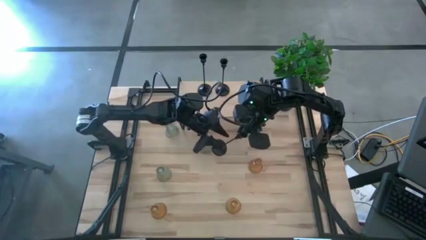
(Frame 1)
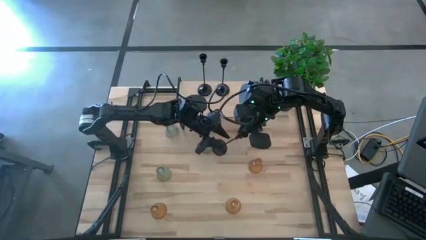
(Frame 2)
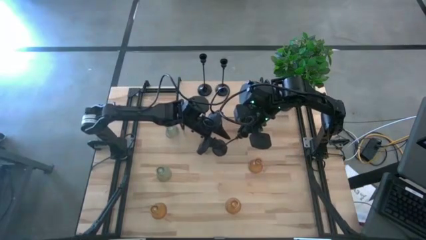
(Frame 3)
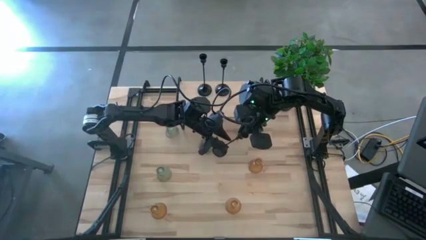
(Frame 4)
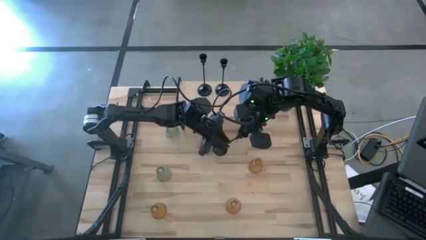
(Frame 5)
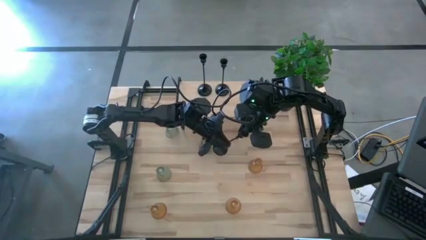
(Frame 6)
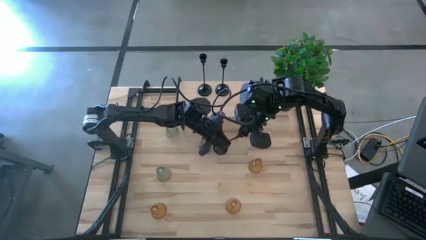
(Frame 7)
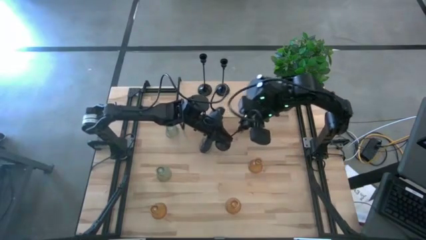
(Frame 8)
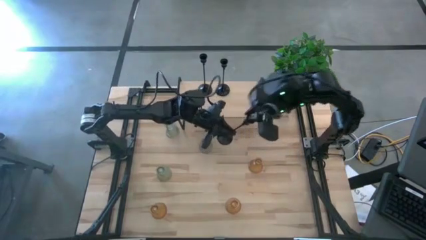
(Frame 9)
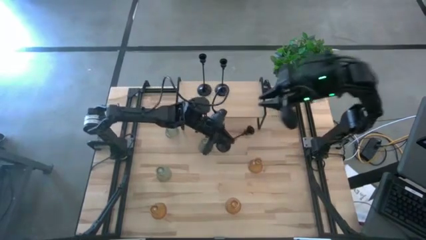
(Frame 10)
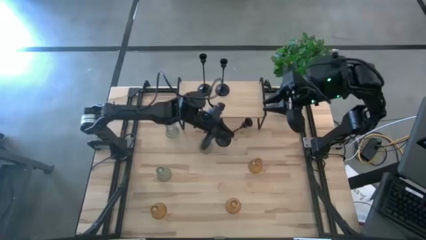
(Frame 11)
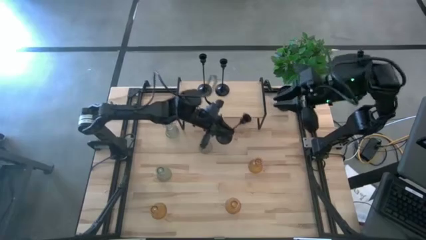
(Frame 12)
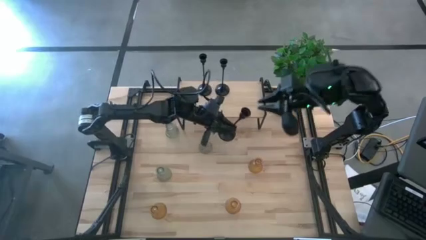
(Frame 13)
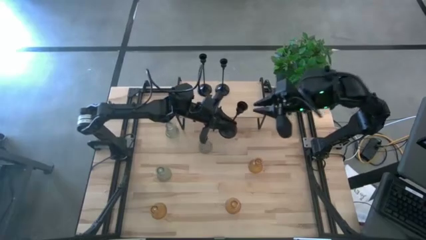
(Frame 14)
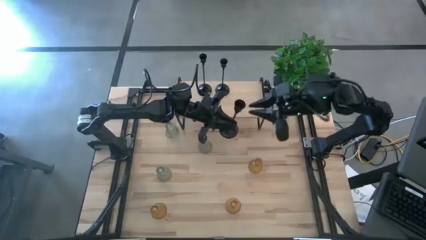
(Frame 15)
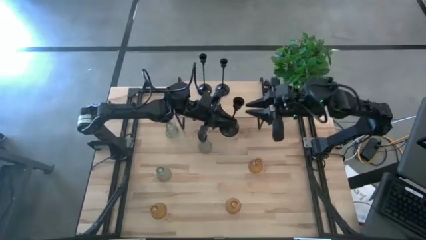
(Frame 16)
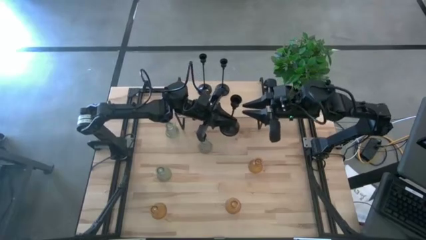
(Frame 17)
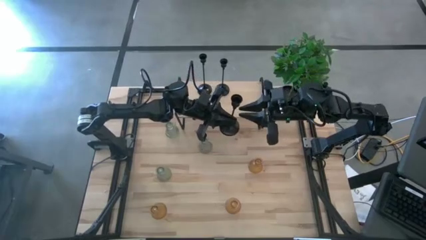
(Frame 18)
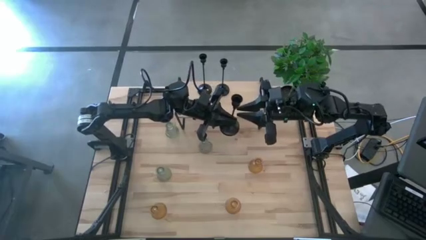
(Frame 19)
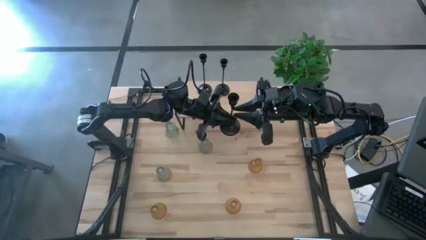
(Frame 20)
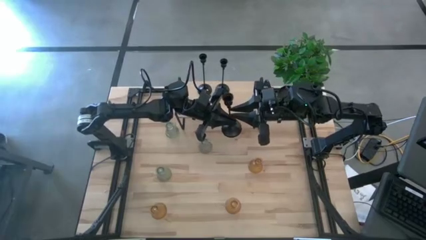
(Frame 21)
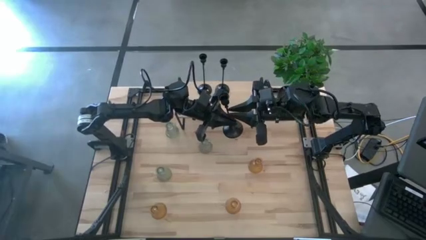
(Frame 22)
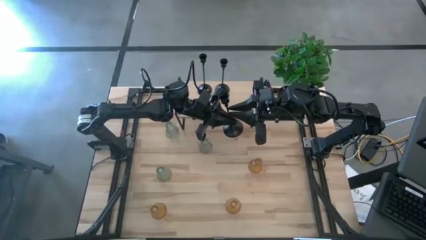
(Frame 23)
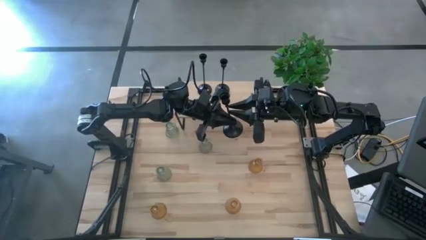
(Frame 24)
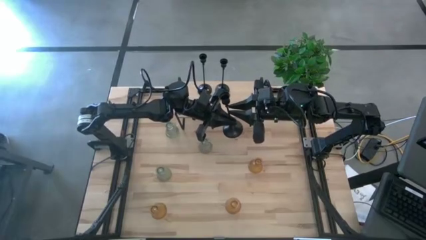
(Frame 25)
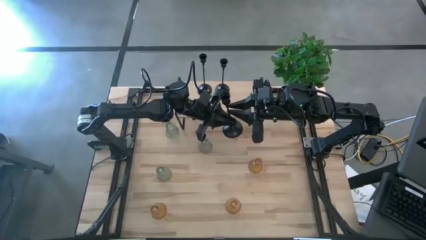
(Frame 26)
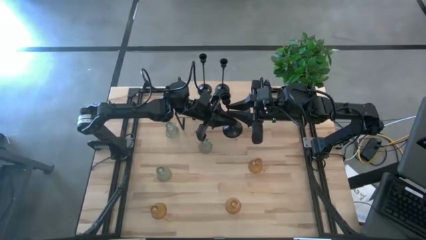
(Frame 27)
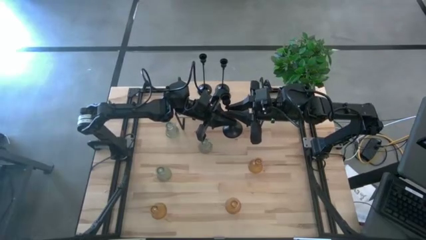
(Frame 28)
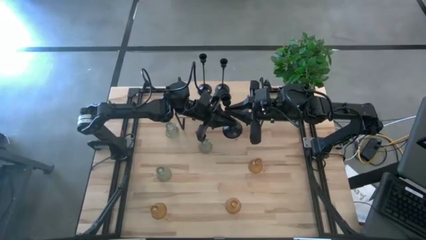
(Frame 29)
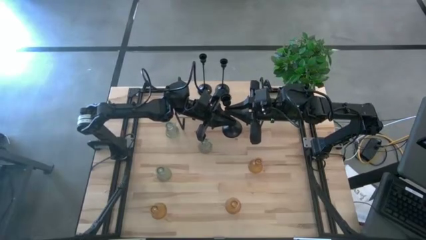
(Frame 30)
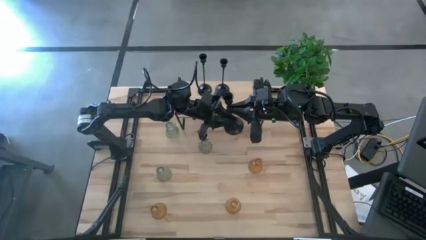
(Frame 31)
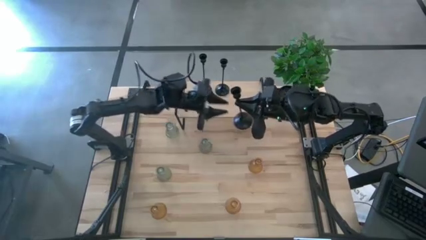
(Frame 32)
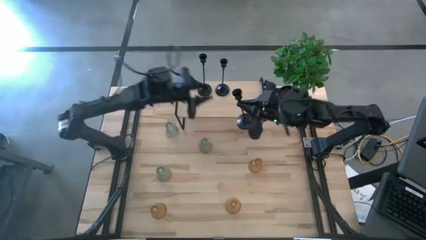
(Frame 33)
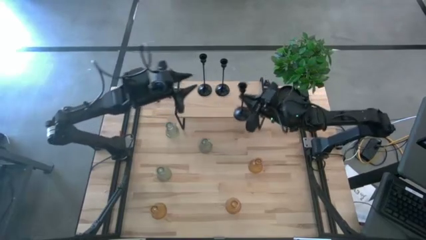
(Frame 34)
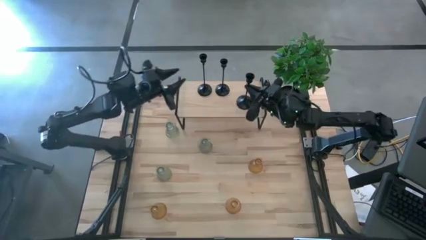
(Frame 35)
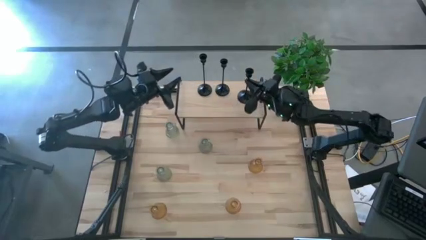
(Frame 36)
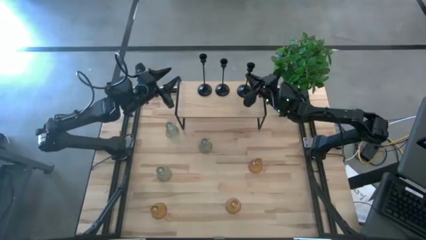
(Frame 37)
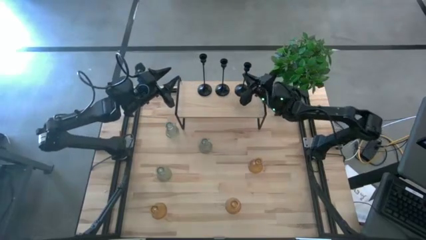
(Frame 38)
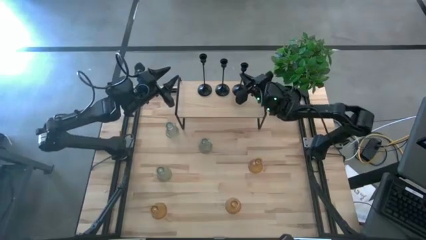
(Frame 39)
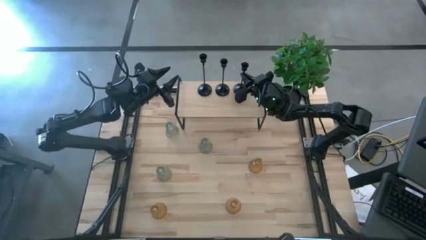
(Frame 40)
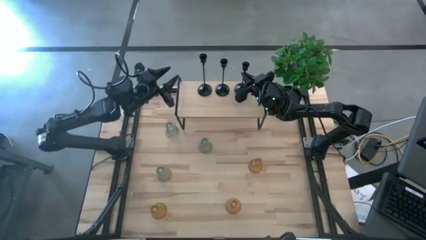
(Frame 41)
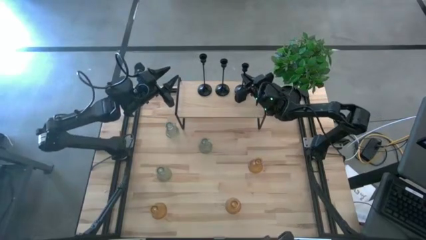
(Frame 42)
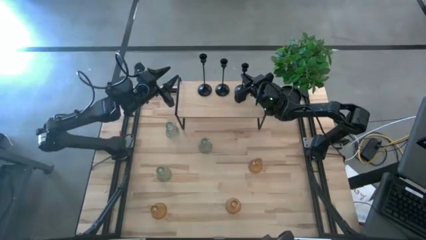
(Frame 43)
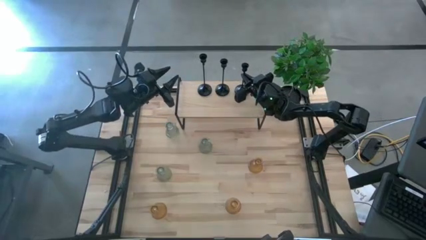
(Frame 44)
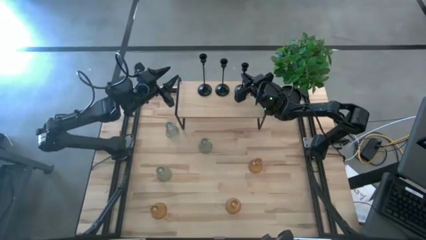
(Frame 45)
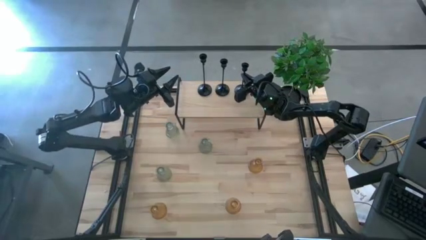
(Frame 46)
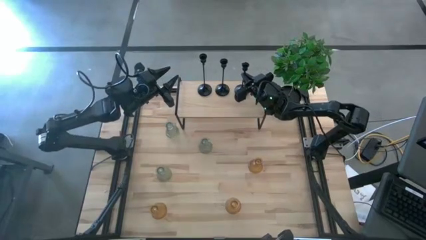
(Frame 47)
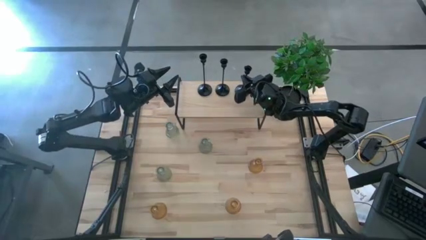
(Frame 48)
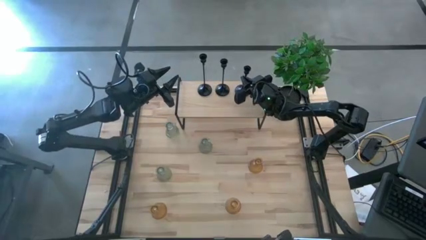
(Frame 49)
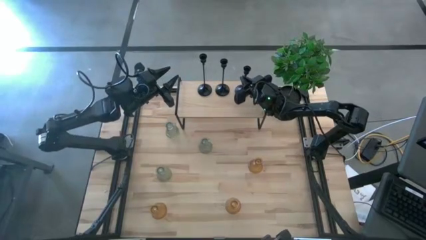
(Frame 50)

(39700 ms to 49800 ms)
Task: Pick & Place candle stick holders
Put the black candle holder on the shelf

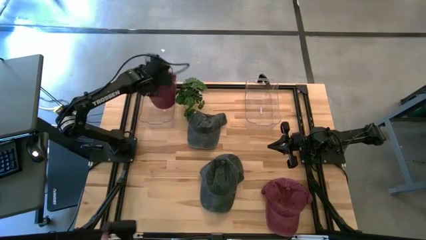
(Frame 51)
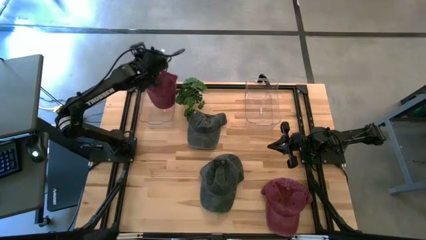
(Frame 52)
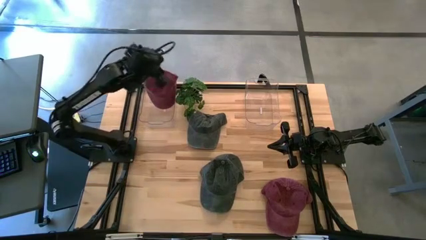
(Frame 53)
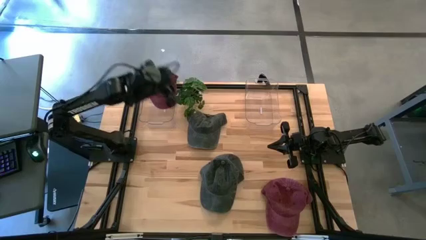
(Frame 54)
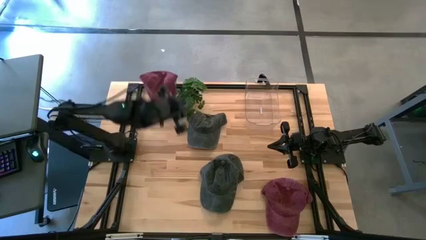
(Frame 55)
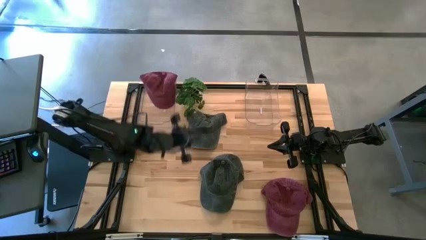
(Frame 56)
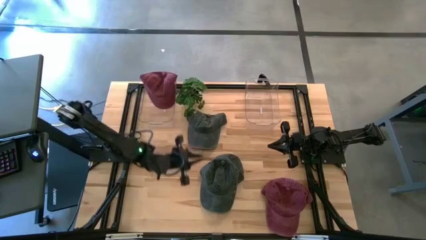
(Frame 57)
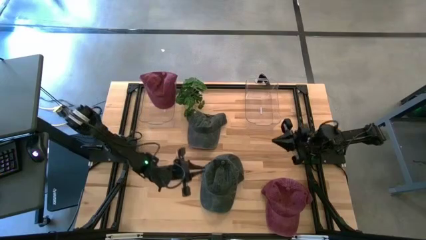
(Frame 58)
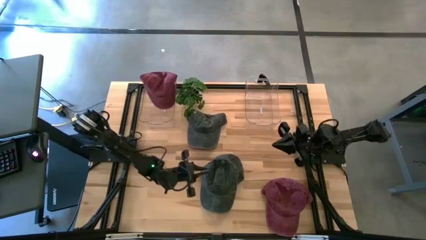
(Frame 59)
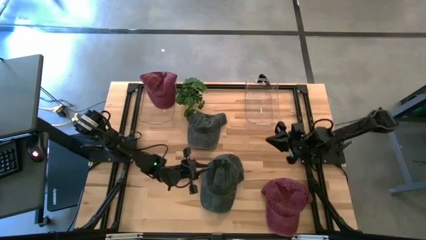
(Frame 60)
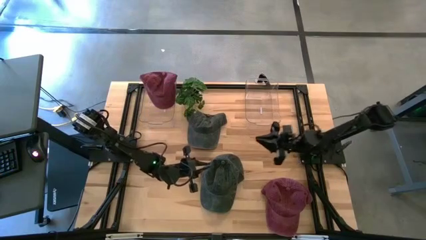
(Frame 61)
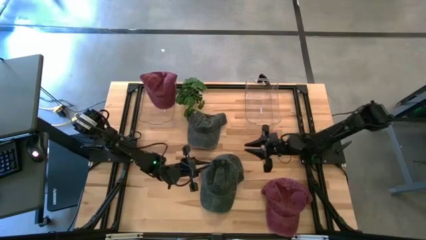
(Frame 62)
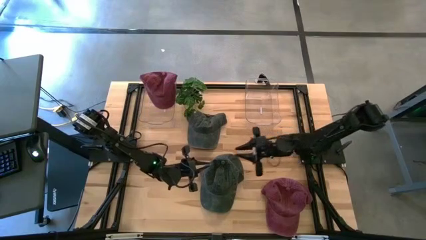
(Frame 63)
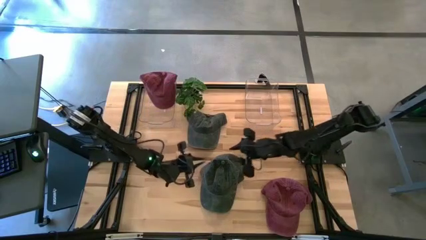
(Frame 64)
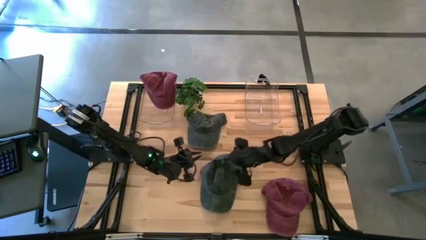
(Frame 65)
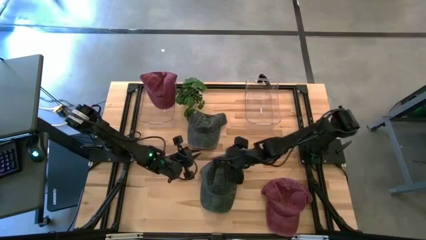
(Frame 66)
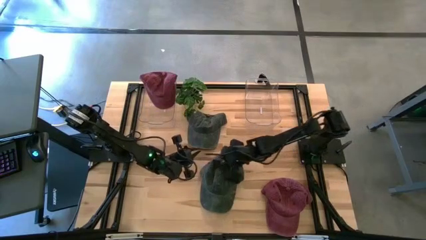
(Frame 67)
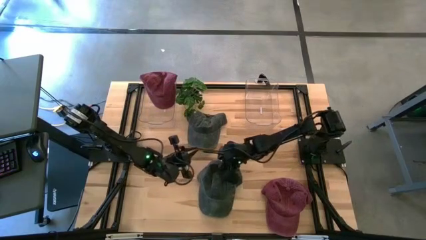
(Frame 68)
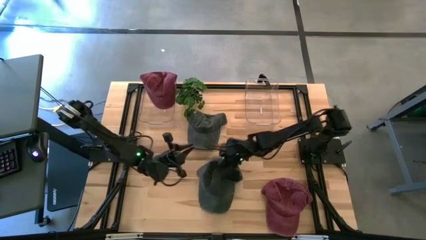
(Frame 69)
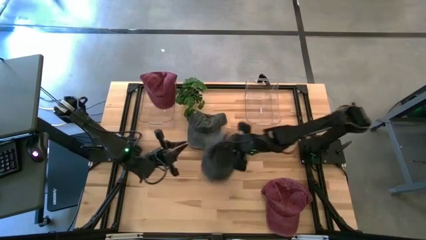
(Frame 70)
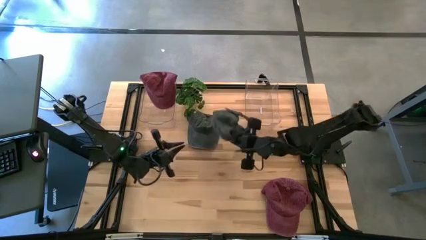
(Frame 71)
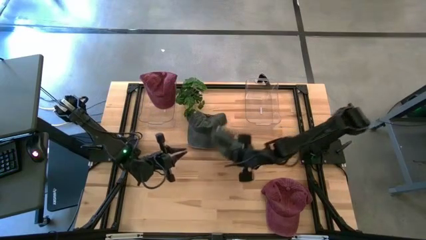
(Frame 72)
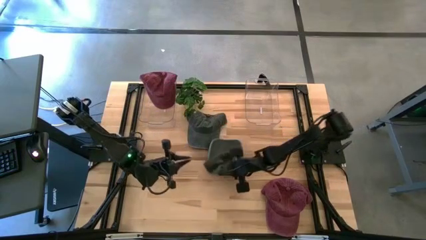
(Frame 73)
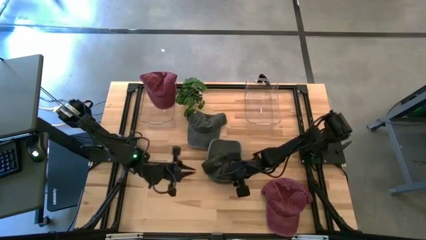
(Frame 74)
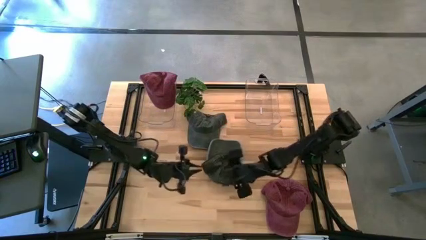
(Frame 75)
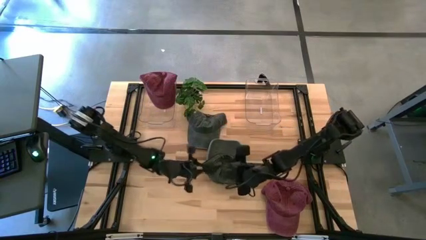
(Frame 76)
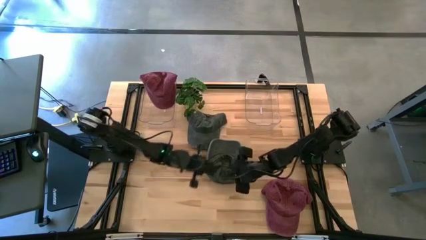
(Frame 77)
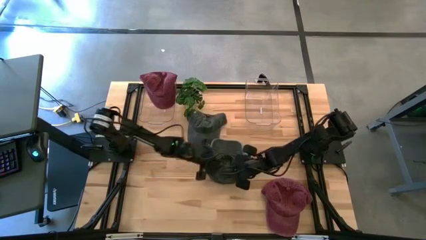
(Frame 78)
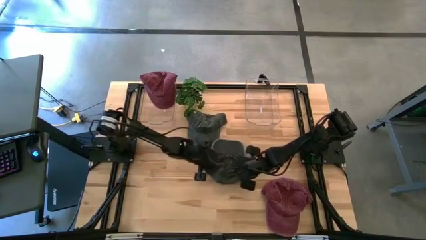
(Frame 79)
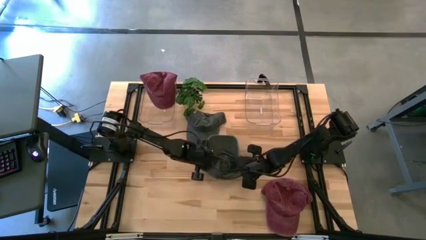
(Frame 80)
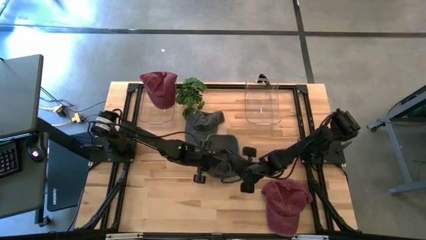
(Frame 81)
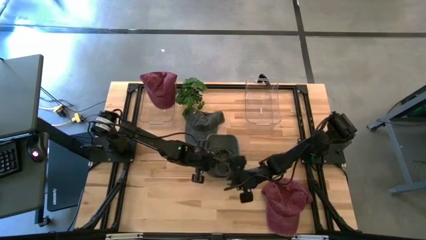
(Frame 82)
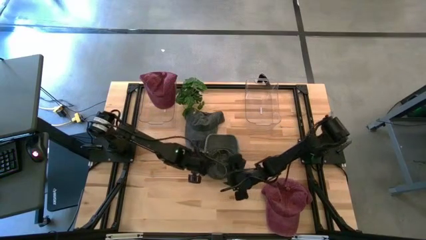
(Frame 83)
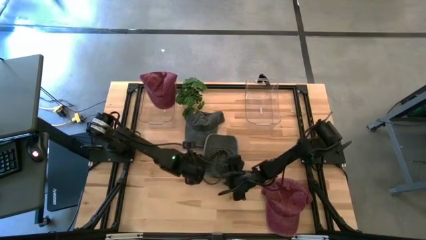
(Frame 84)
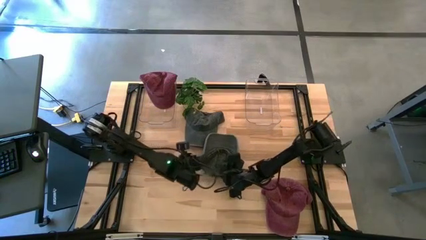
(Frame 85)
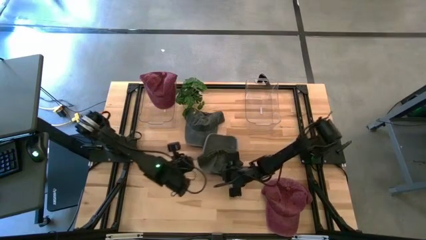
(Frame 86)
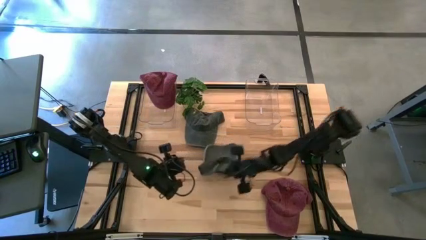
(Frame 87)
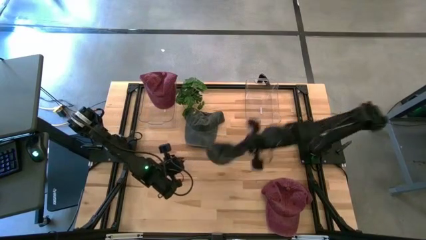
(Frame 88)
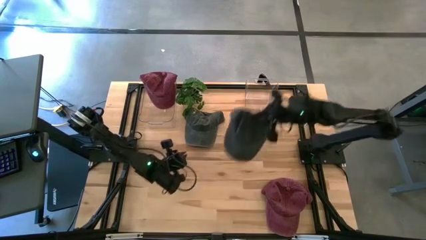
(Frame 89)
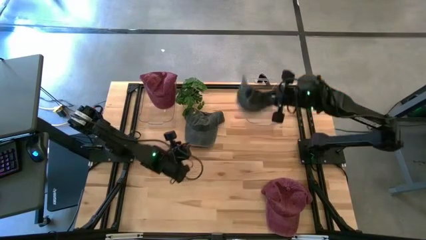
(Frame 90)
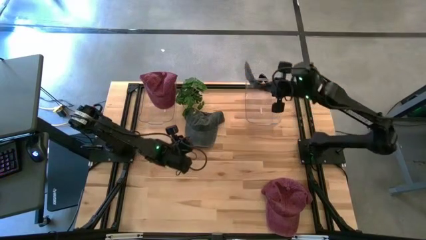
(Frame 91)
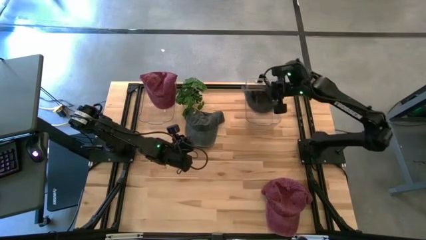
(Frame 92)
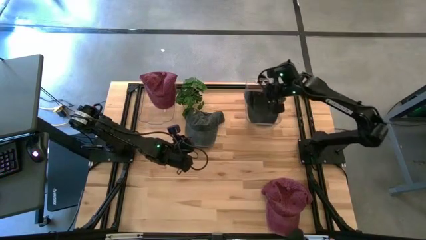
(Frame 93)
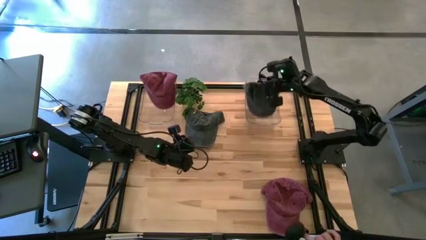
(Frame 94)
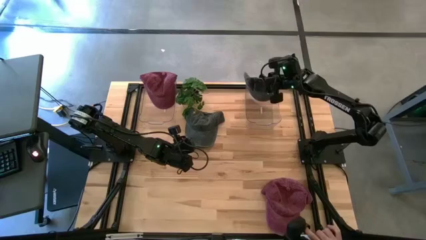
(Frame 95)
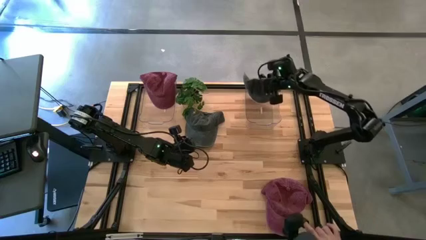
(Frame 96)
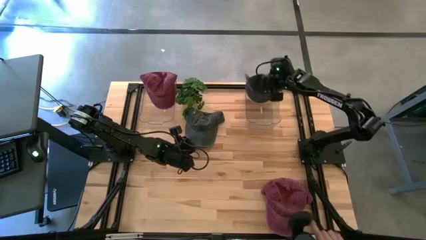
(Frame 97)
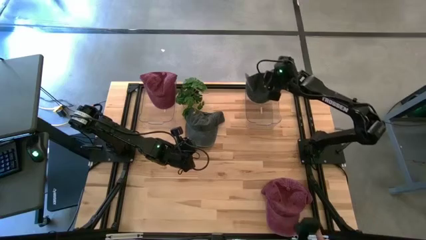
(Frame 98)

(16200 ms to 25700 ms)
Task: Pick & Place hat
Put the bottom gray cap into the right transparent bin
